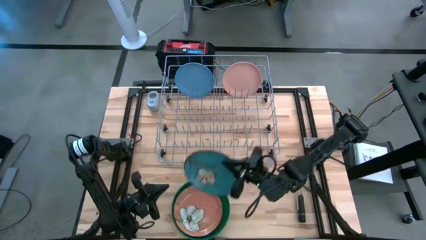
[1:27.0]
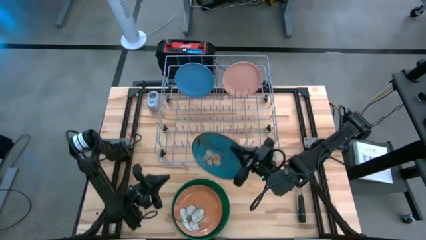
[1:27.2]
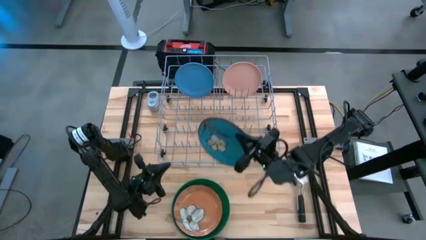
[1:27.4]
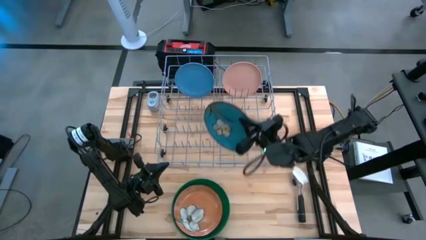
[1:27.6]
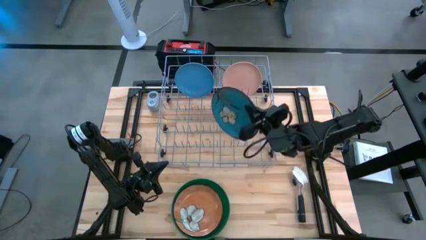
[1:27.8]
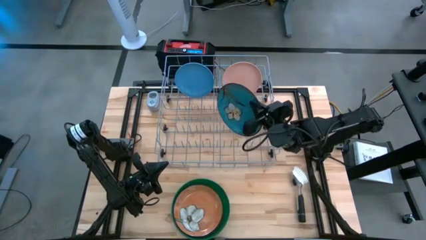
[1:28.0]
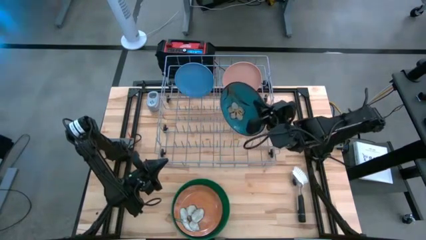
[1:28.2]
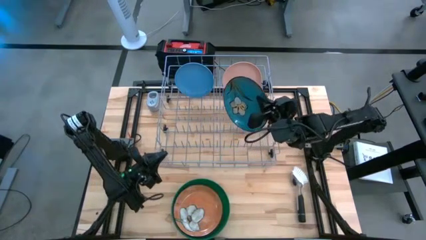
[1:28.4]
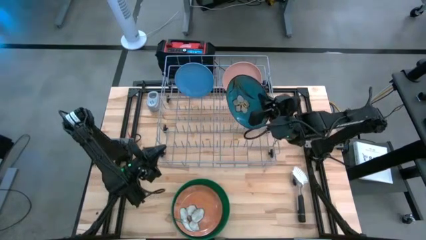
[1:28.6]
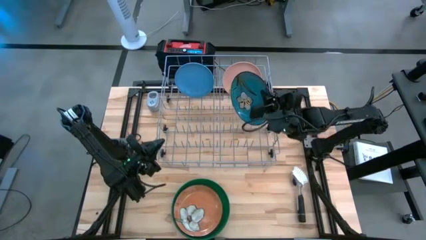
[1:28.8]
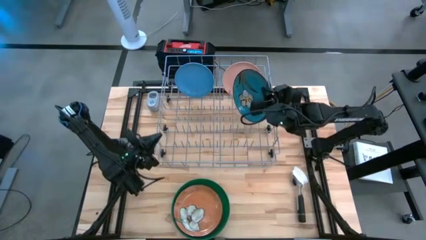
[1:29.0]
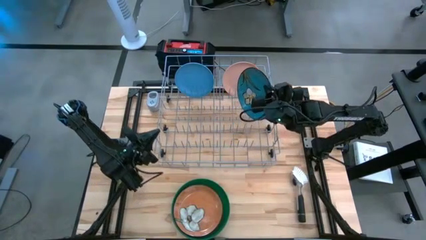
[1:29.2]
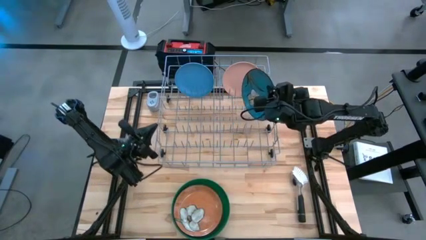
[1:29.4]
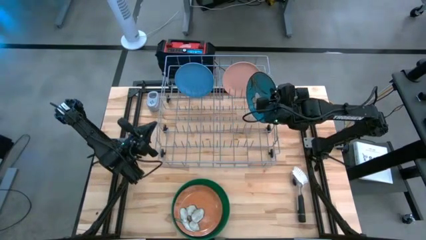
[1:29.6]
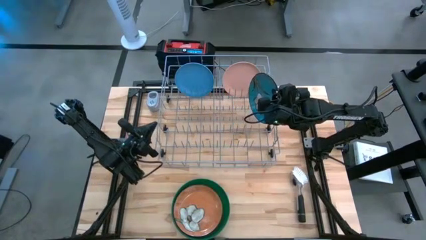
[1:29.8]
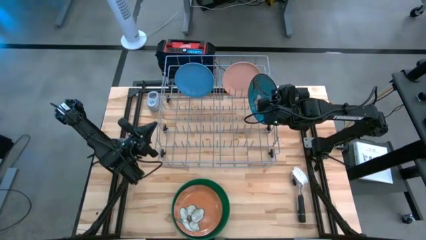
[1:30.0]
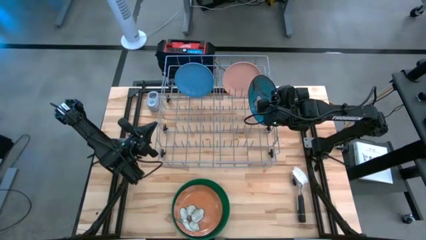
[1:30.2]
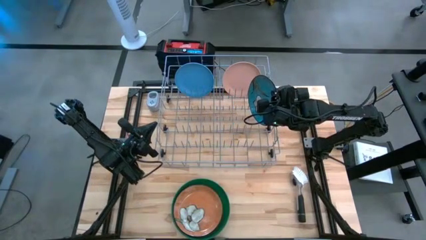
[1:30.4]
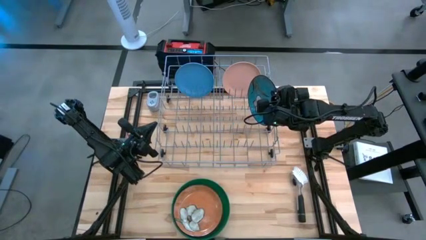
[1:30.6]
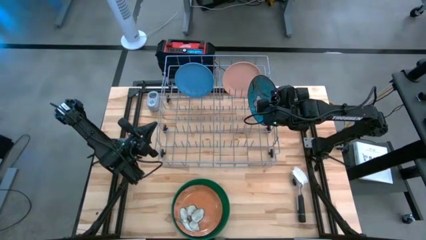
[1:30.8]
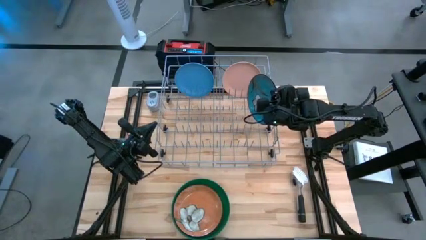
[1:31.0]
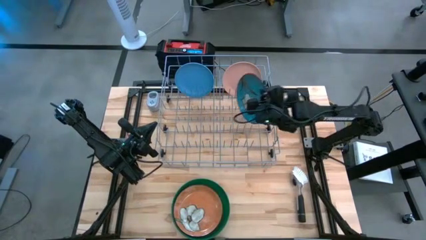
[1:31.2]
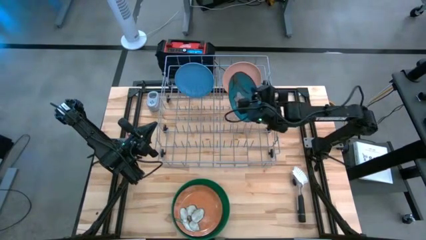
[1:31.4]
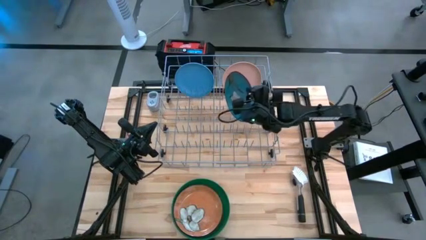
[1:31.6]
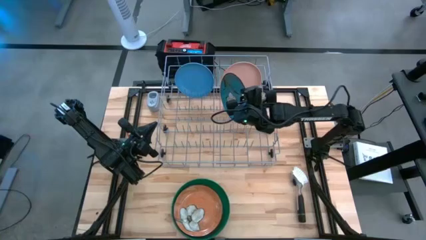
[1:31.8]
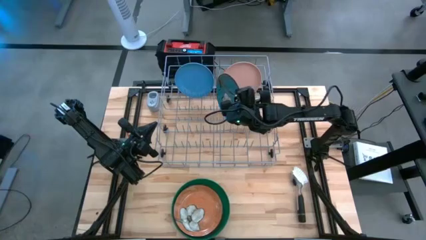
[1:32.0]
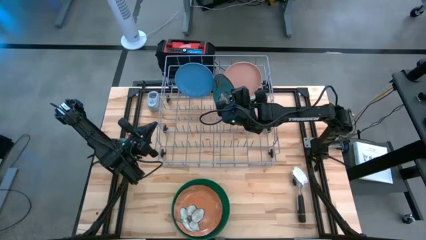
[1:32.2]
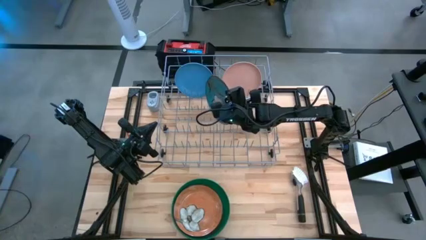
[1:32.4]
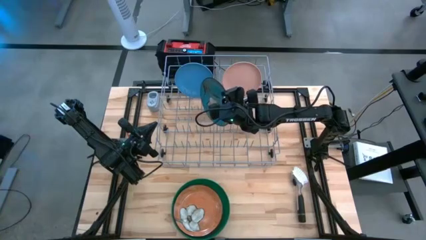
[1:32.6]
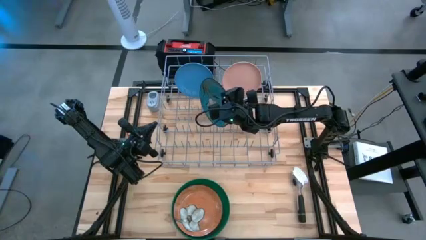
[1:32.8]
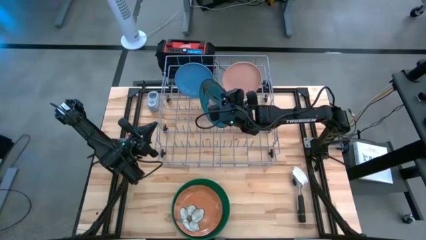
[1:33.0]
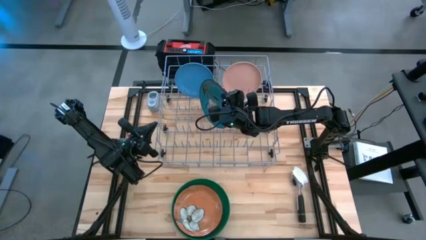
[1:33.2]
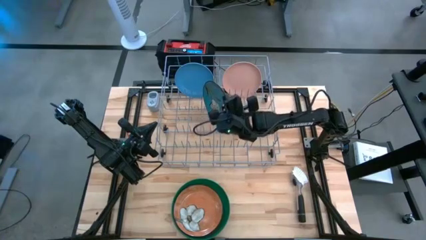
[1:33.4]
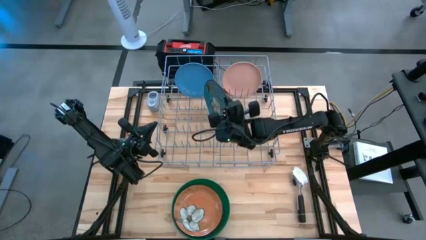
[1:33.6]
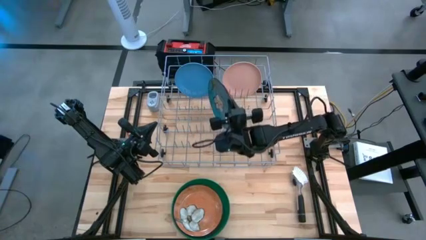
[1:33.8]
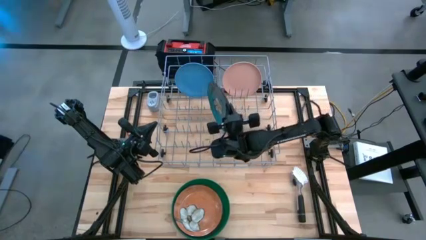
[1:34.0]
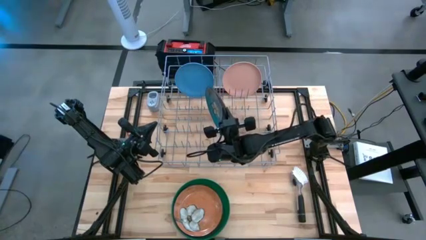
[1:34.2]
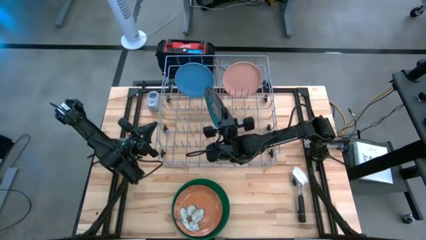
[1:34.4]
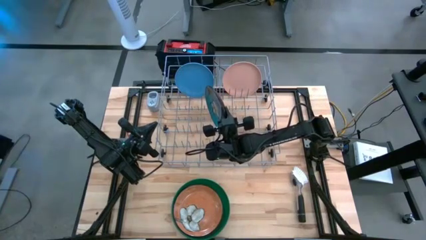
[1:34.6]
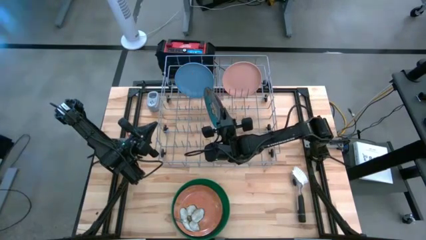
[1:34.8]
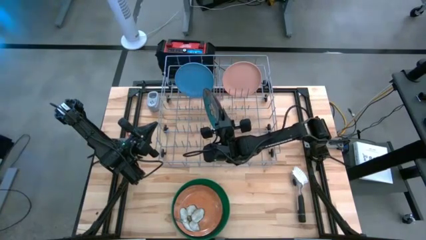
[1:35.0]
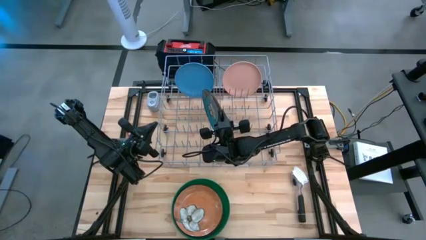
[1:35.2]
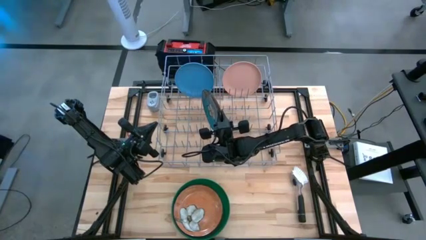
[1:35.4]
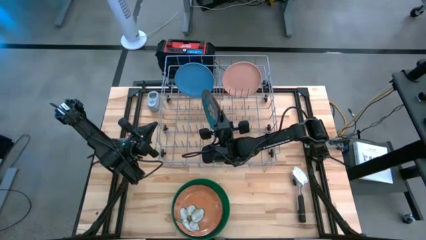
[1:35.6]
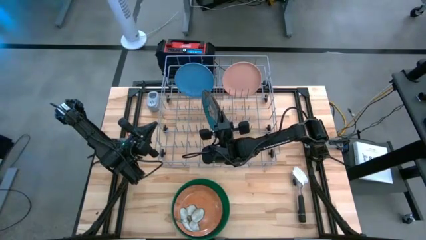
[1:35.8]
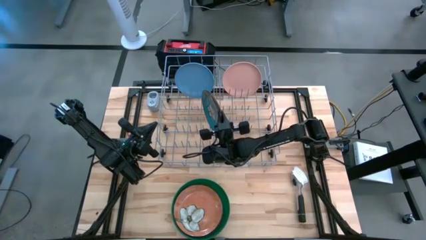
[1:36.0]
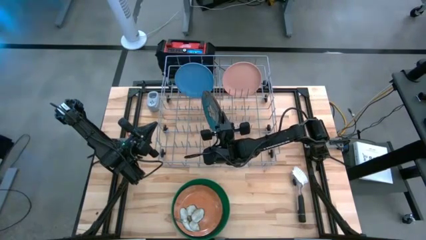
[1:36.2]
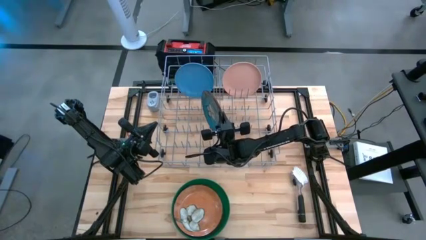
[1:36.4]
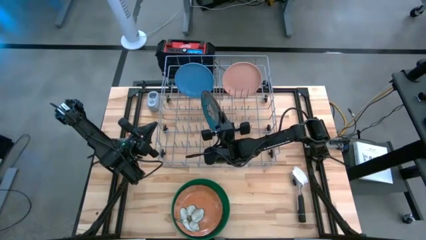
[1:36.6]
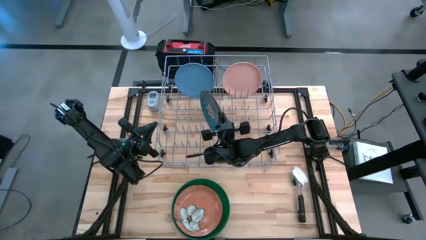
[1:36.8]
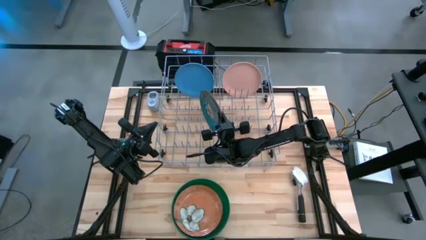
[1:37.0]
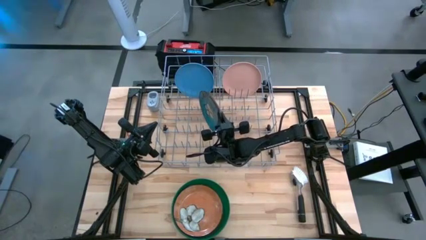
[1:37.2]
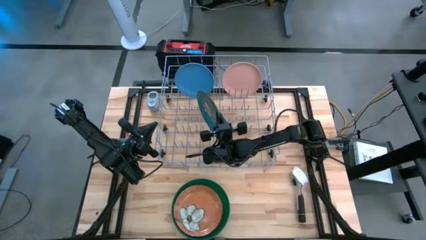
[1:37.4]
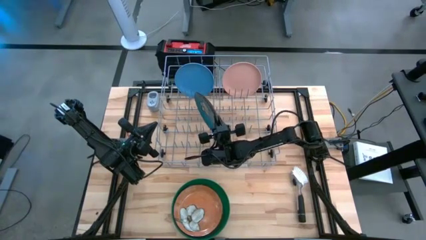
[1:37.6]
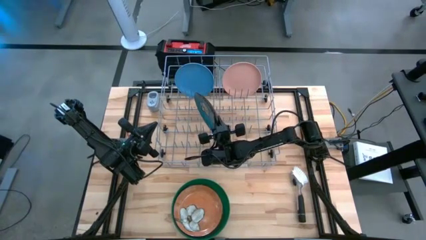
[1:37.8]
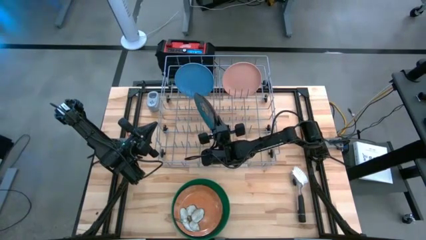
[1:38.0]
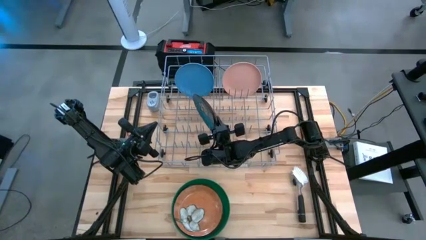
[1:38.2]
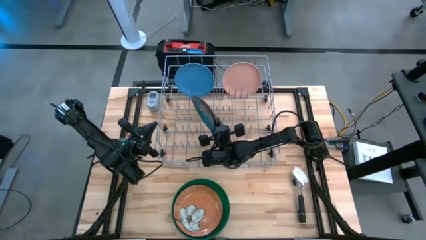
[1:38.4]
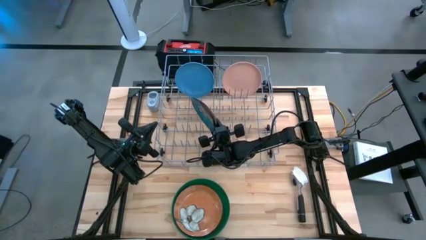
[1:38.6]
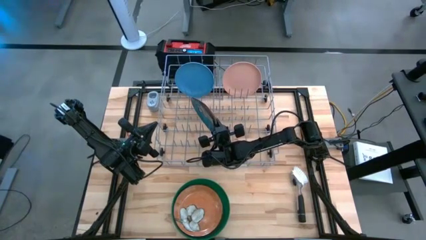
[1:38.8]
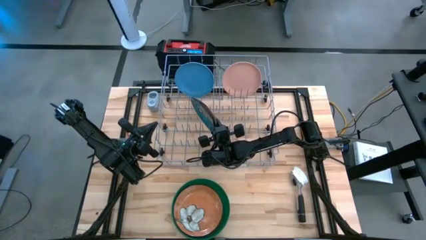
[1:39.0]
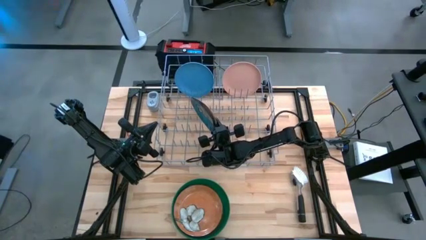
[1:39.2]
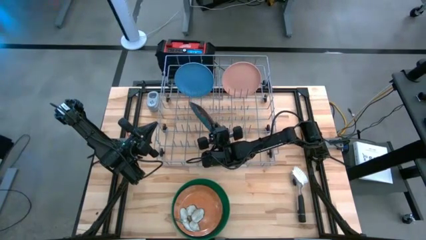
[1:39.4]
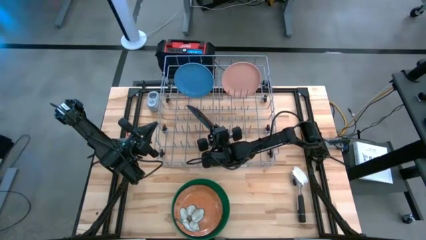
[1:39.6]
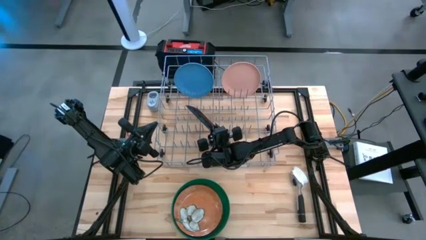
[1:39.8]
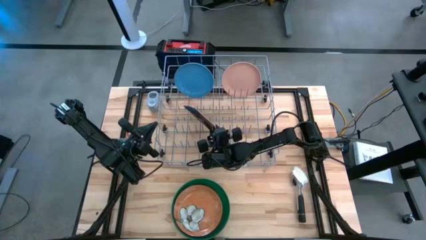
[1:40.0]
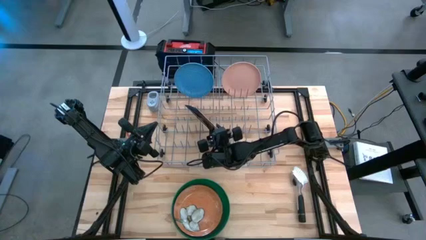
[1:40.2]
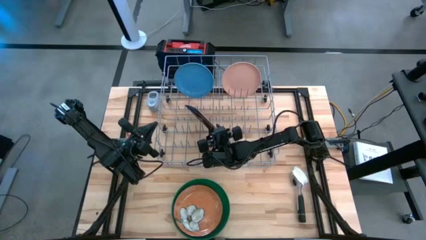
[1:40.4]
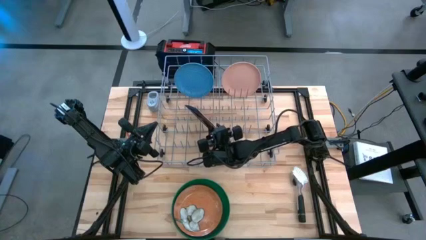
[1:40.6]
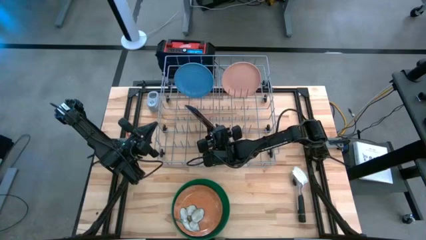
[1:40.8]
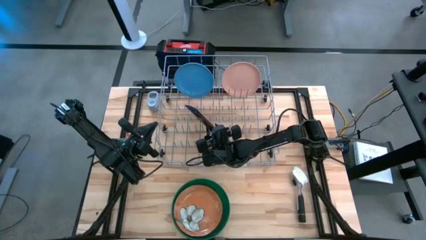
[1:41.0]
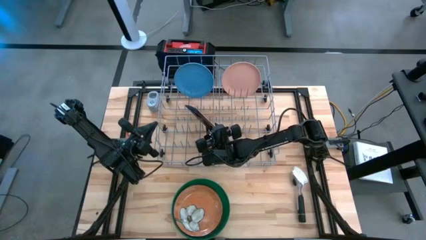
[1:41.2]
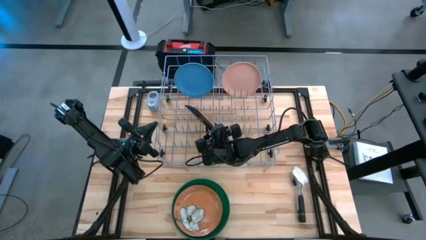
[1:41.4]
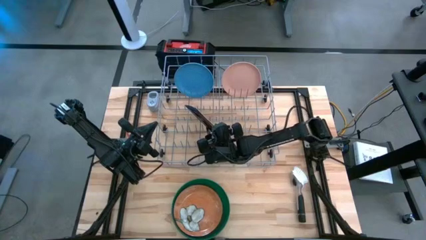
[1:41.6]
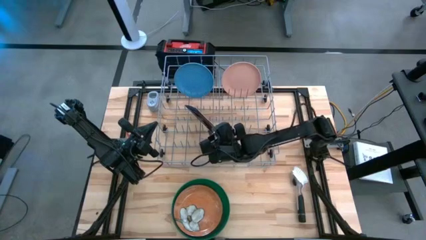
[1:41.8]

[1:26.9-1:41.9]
Task: Sort dishes
Put the blue floral plate into the dish rack

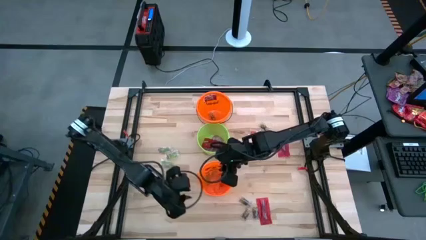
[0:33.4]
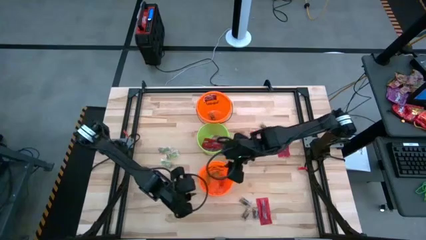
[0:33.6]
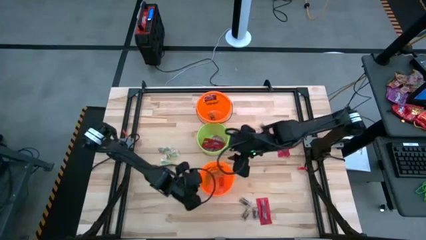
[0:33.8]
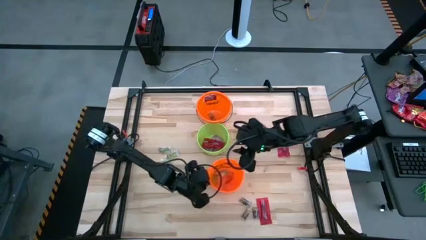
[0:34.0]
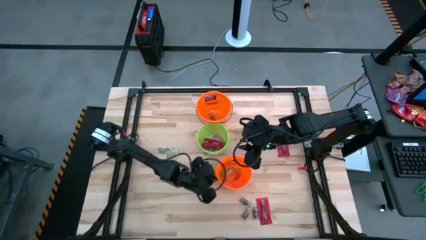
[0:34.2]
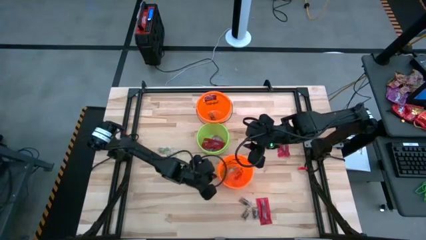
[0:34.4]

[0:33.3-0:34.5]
Task: Sort candy by brand, put in halloween buckets
Adjust the bottom orange bucket

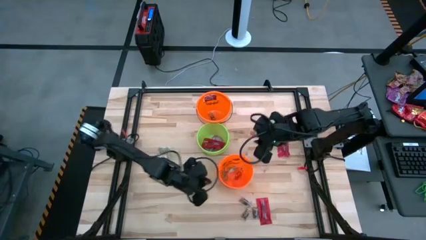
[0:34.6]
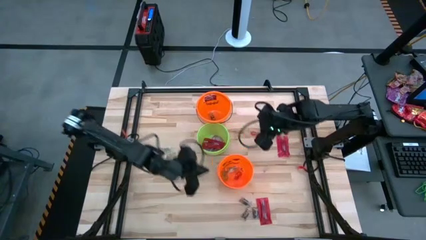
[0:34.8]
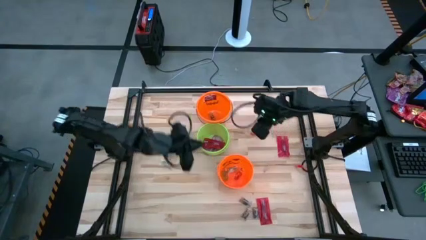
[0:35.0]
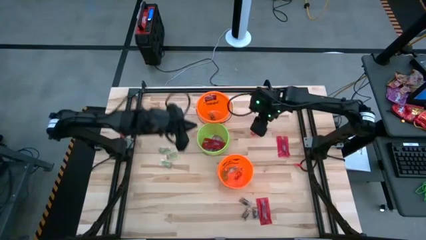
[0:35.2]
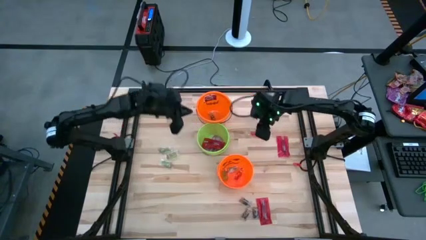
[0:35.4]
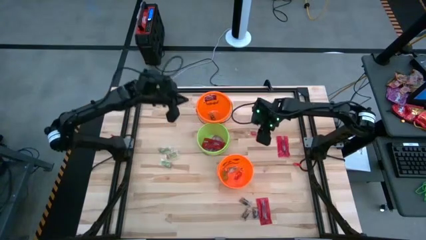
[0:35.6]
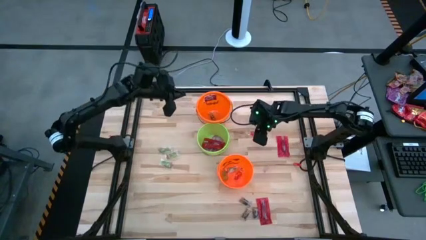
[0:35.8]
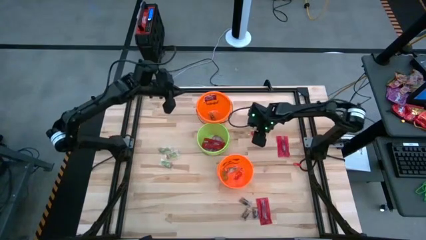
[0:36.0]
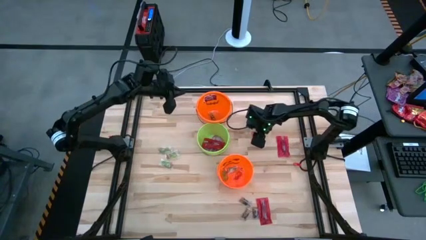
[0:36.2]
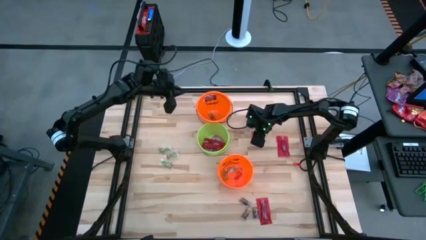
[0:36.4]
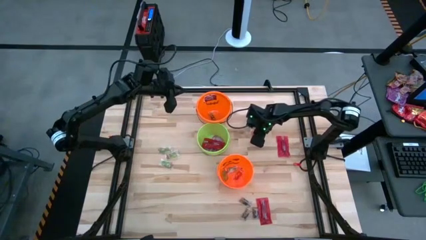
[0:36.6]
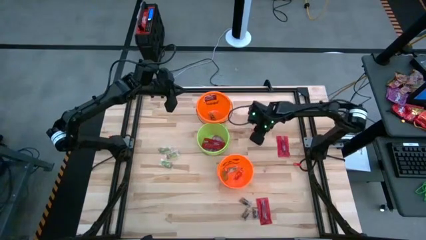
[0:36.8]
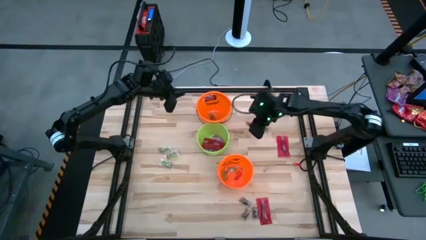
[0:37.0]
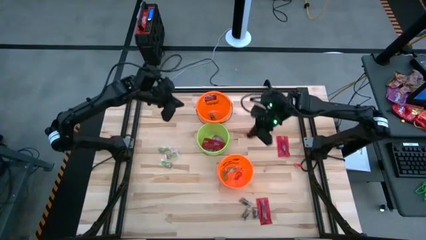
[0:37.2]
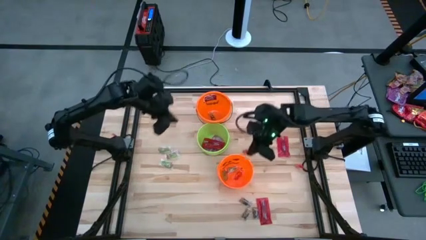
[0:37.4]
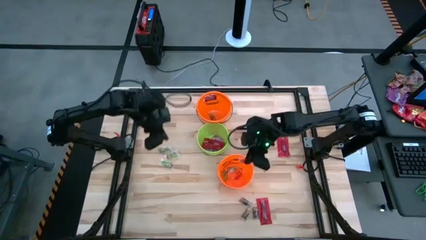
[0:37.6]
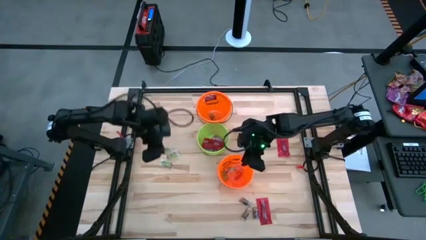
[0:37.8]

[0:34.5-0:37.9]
Put the red gummy into the bottom orange bucket
